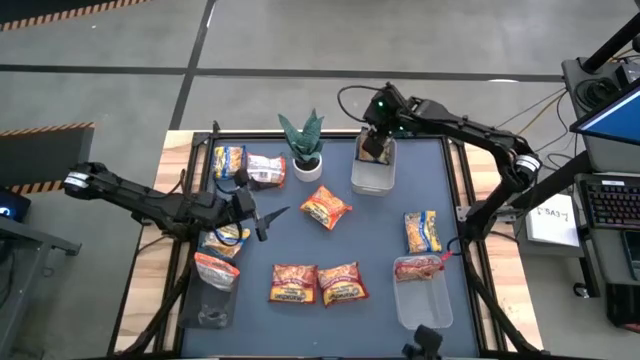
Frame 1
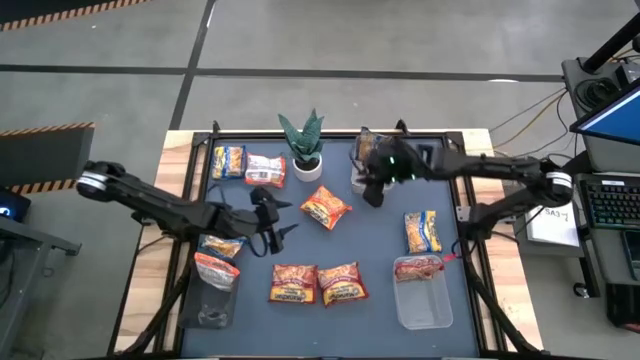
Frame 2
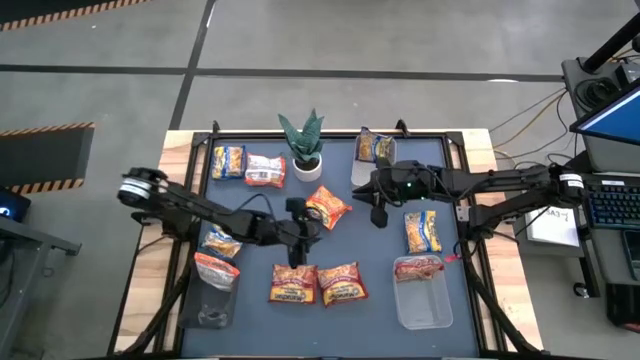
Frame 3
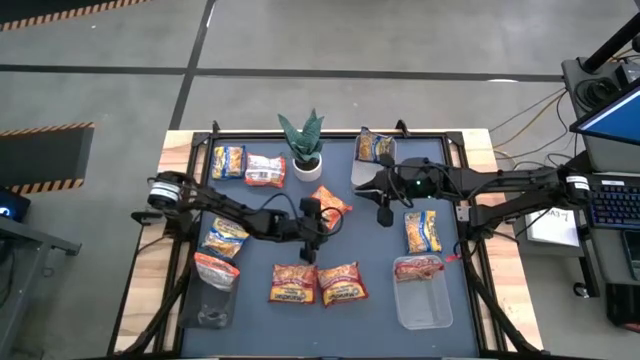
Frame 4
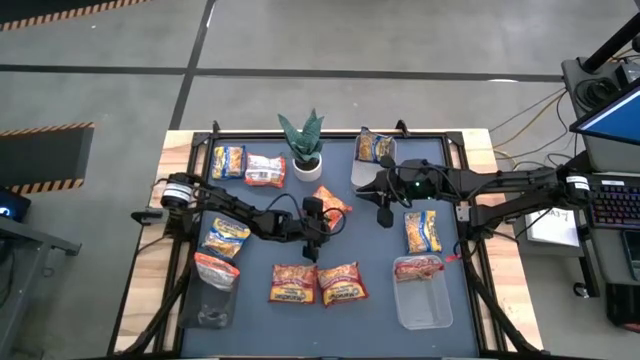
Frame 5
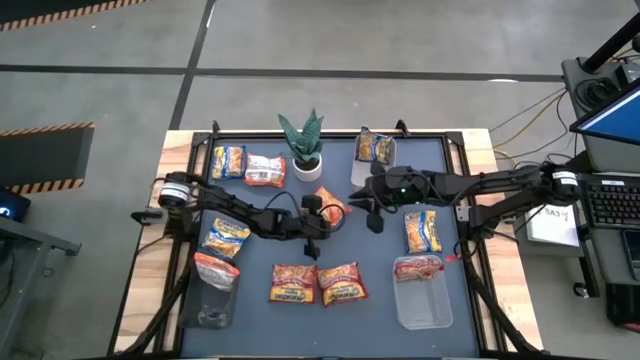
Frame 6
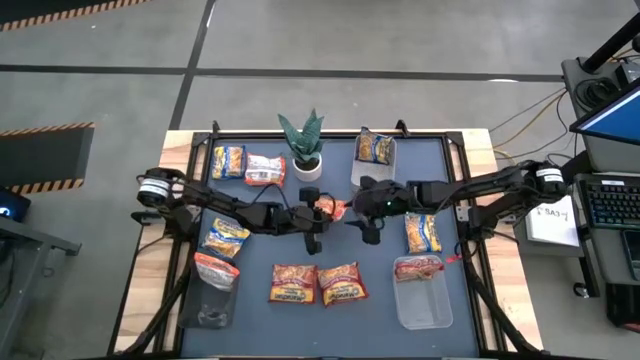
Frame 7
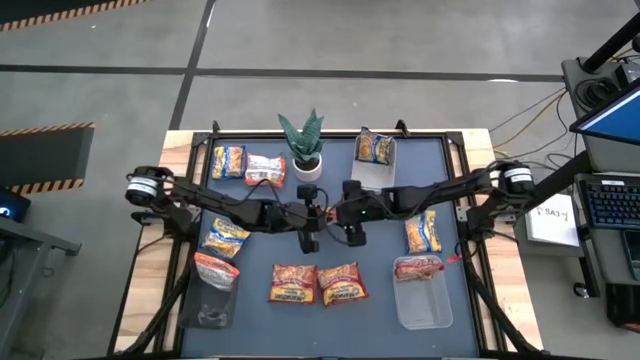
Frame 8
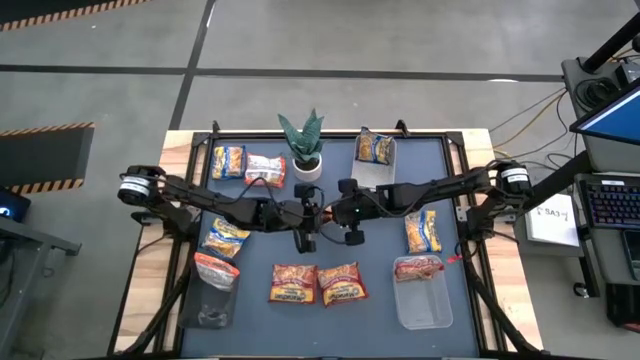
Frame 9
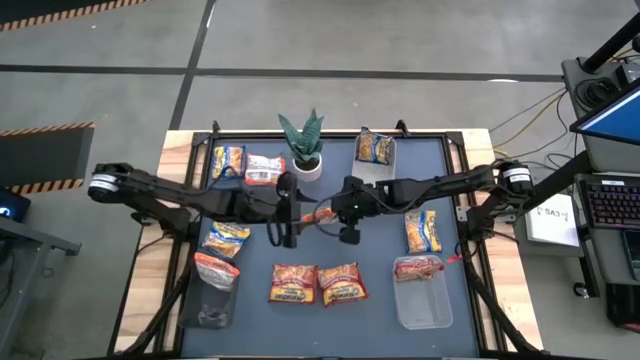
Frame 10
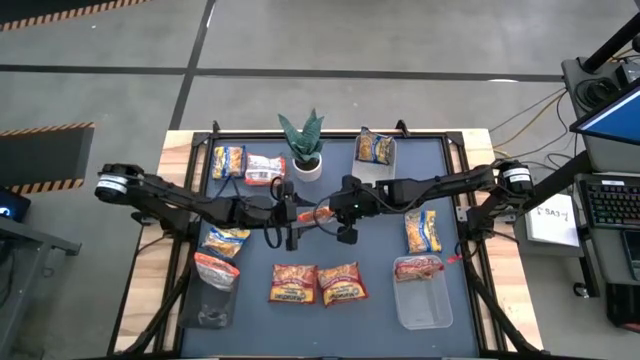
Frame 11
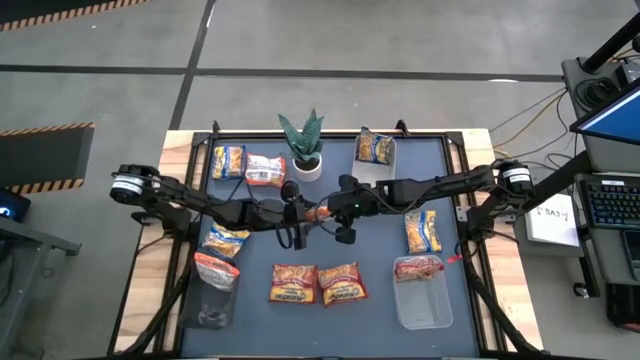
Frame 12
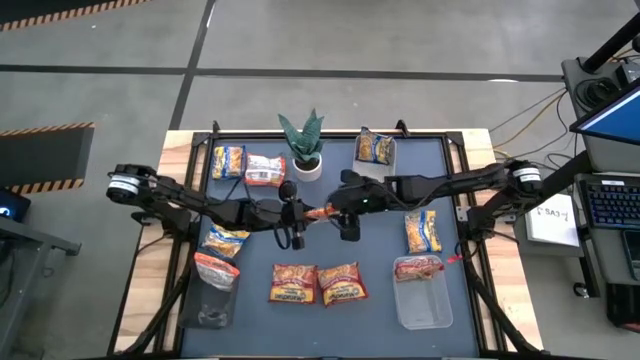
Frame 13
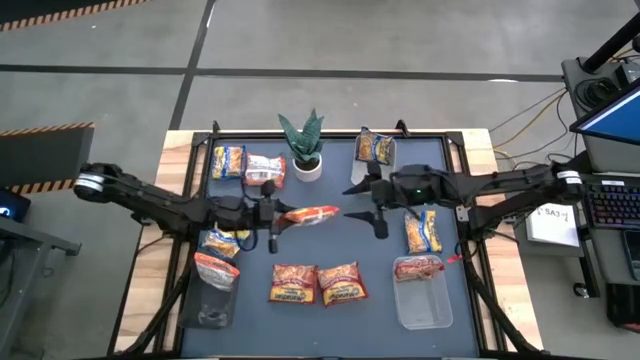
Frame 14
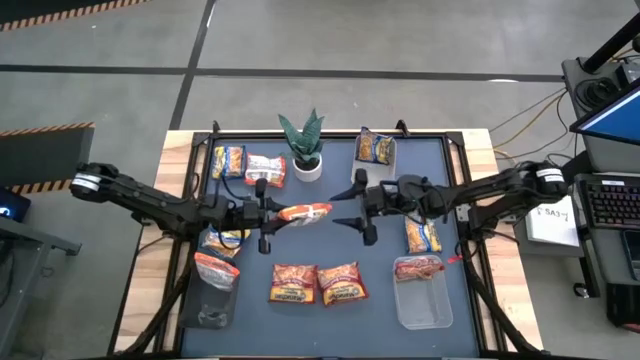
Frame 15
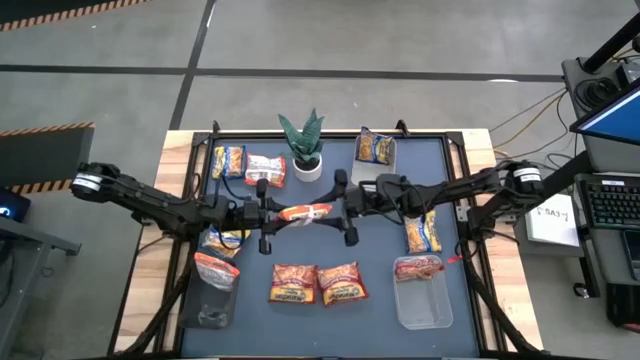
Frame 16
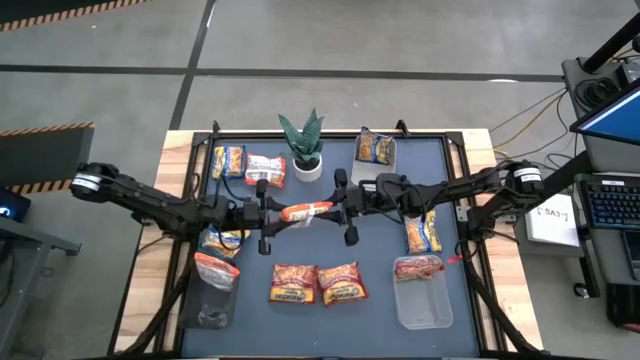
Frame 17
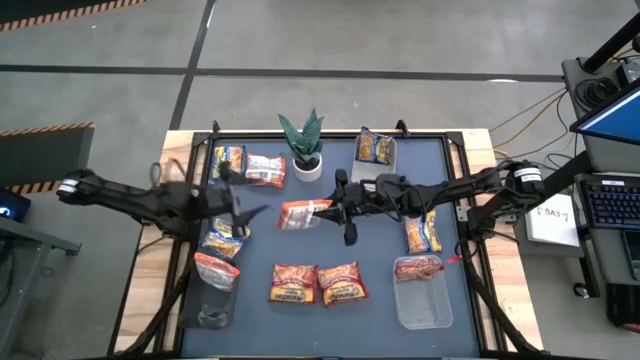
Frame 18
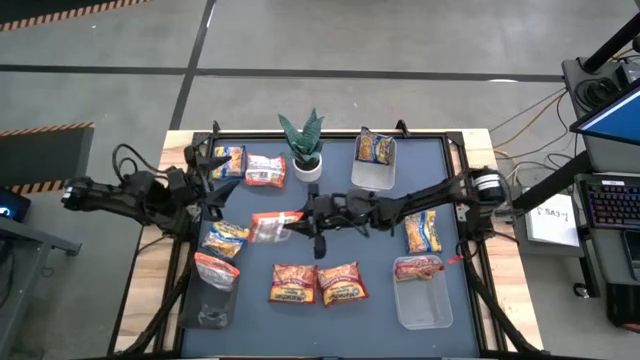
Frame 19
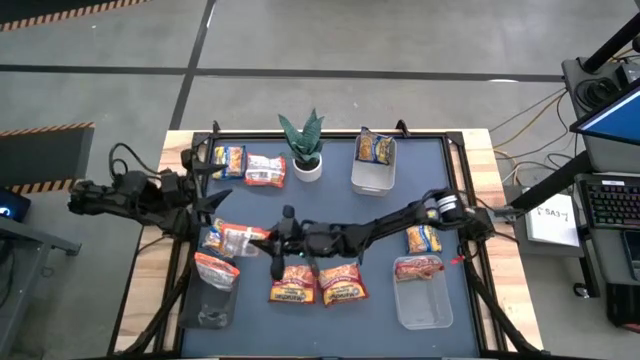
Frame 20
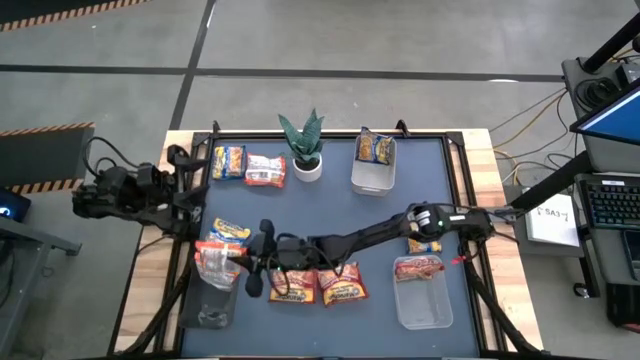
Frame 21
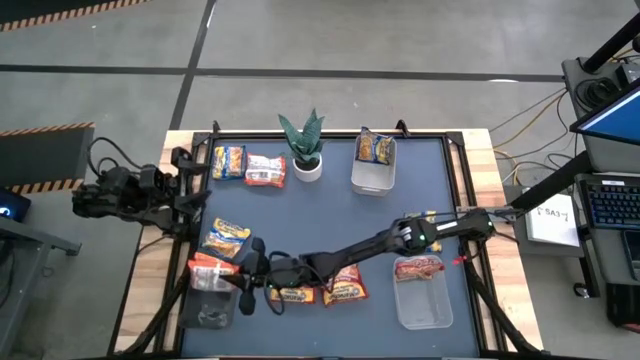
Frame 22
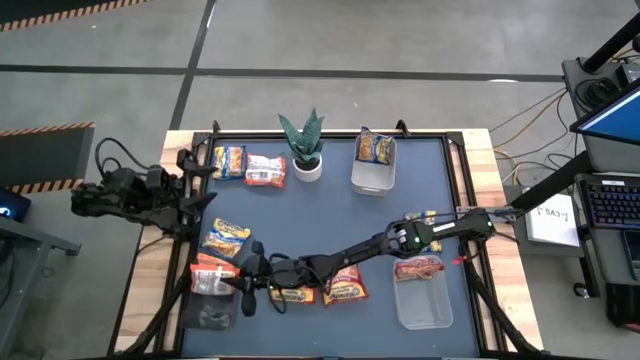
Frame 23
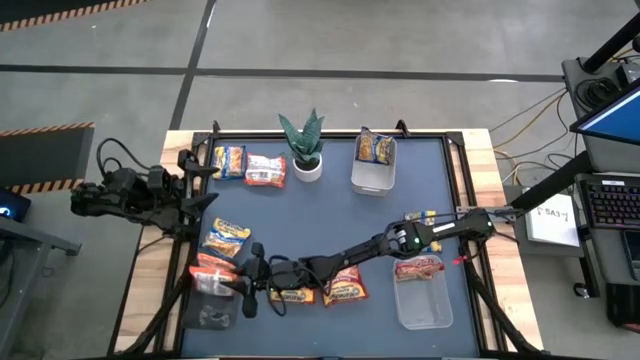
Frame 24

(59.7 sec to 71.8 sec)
Task: Sort Maruchan noodles
Put the bottom orange instant noodle pack into the black bin

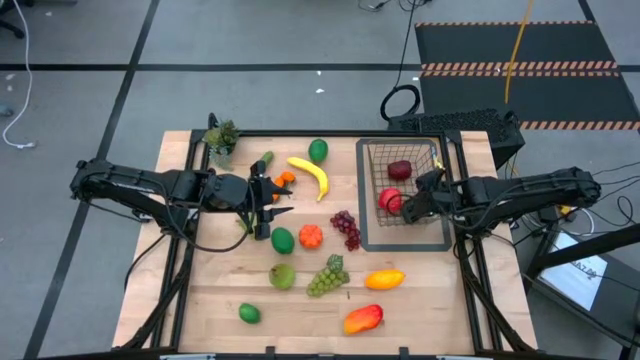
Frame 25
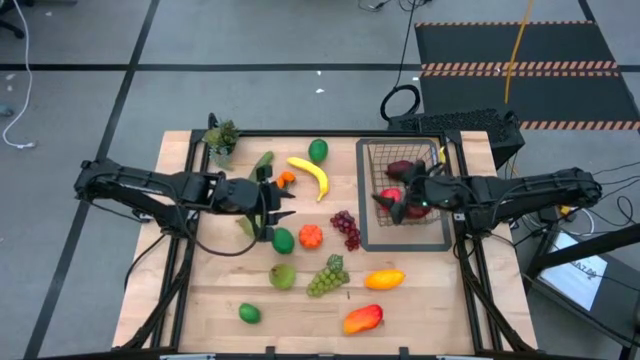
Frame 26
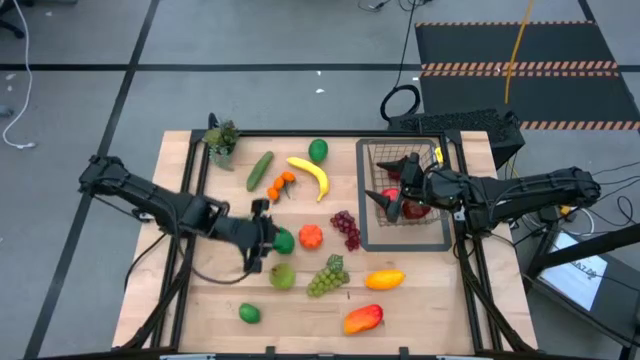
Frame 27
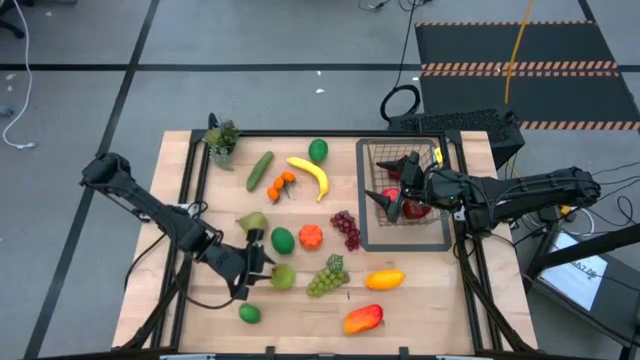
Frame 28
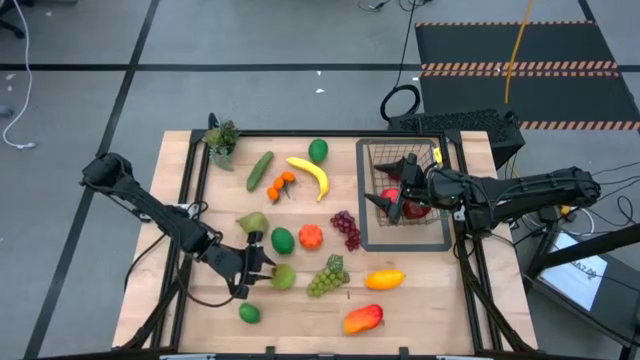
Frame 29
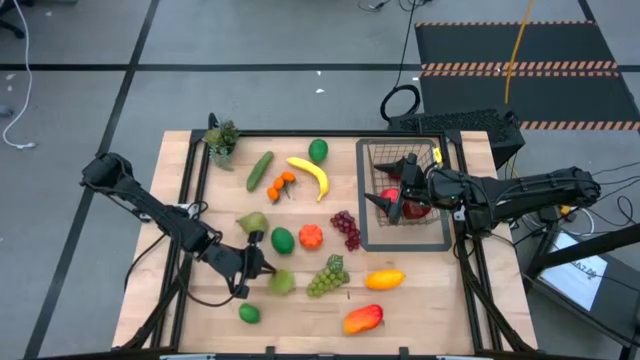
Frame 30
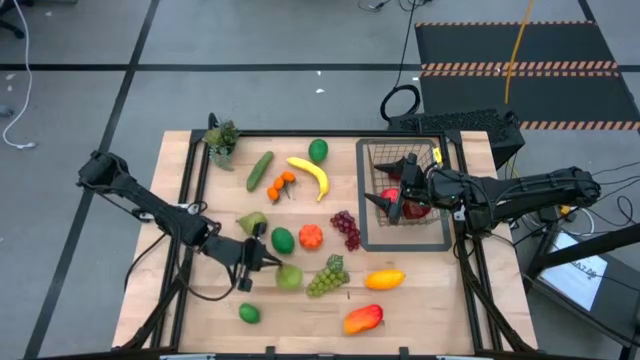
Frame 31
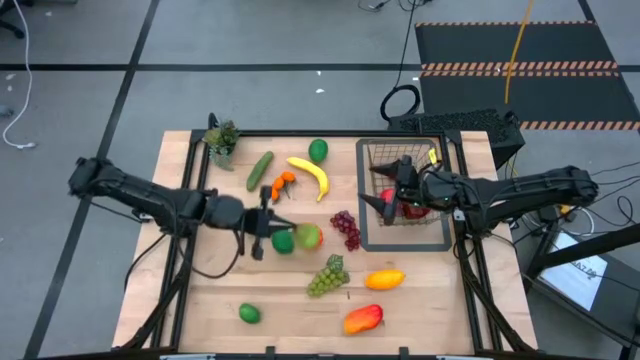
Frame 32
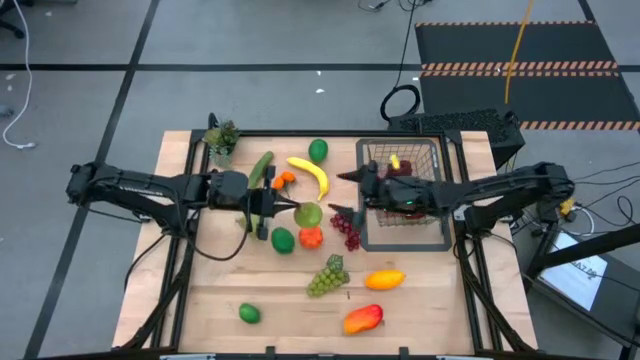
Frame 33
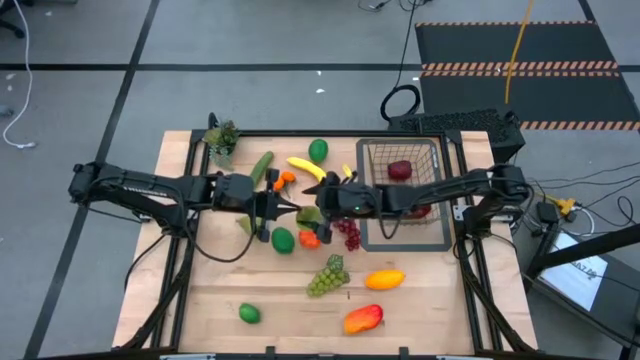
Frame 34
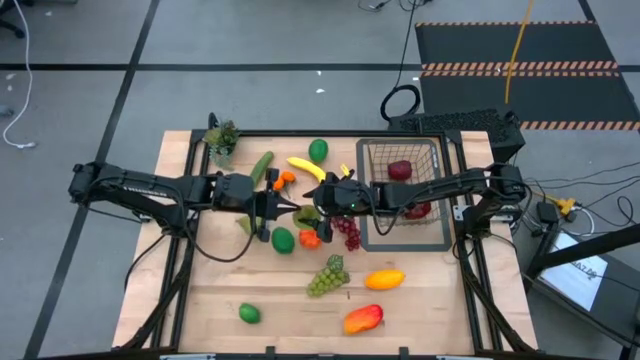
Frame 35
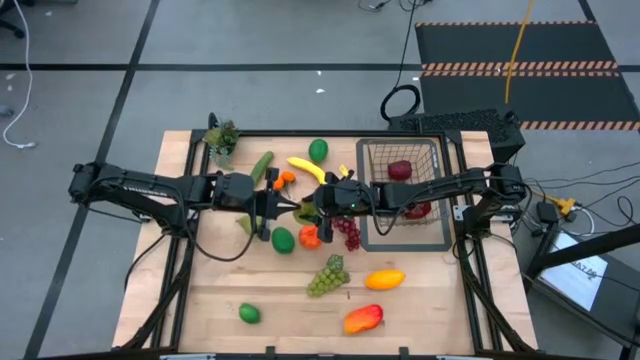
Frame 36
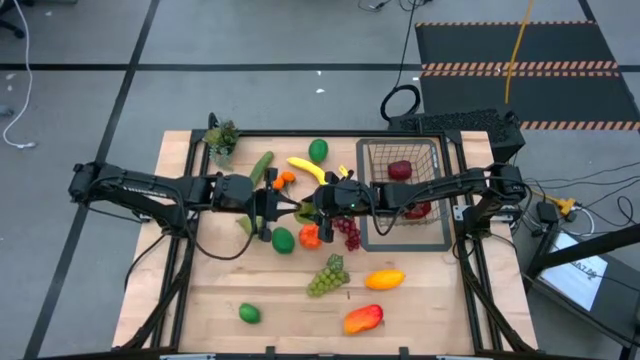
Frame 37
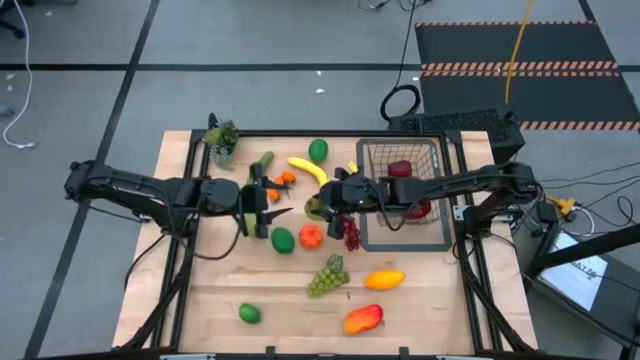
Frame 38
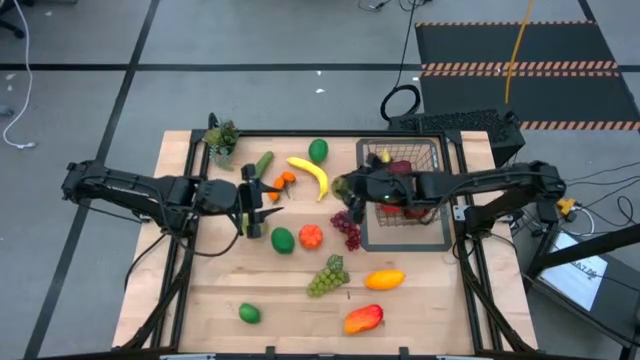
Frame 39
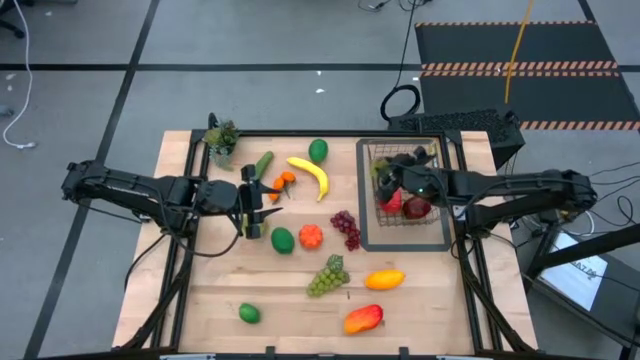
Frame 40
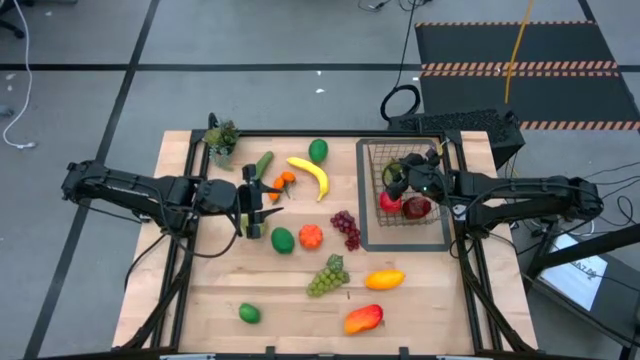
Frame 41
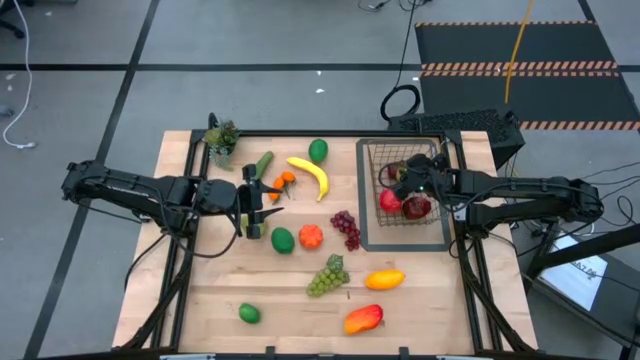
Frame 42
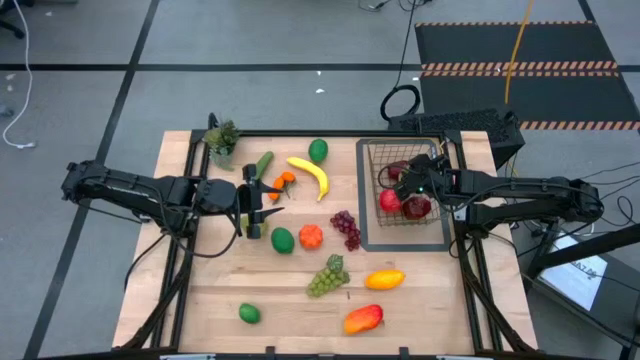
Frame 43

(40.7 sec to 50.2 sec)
Task: Build produce basket
Put the bottom pear into the gold wire basket
